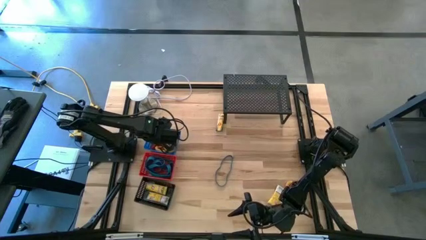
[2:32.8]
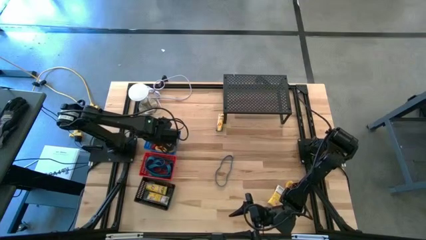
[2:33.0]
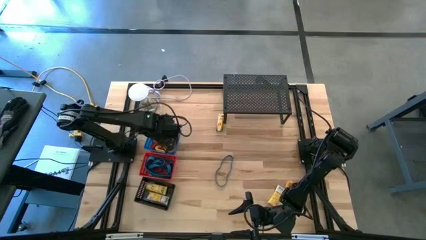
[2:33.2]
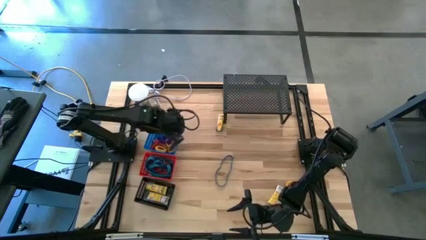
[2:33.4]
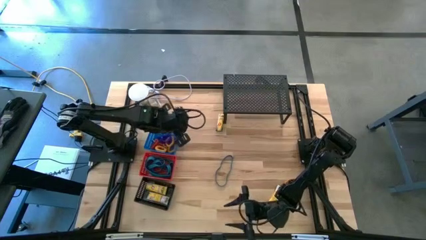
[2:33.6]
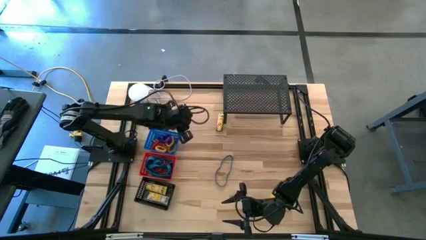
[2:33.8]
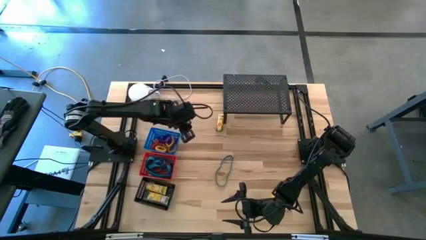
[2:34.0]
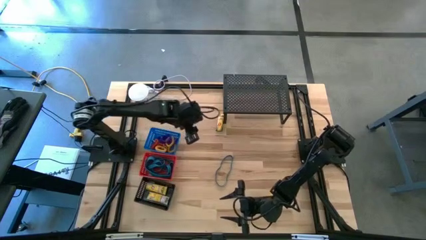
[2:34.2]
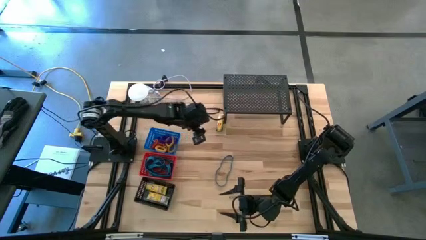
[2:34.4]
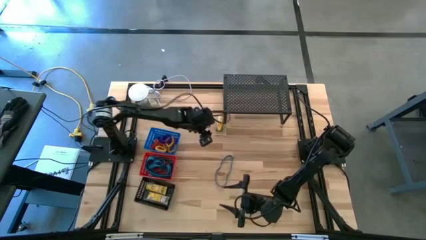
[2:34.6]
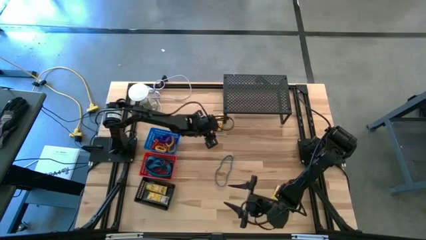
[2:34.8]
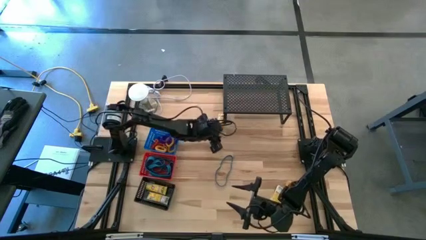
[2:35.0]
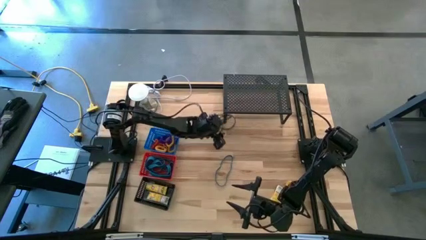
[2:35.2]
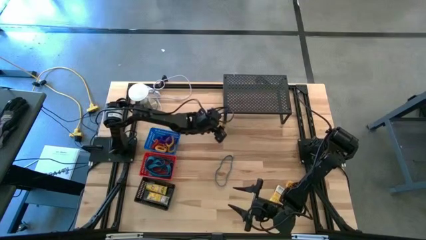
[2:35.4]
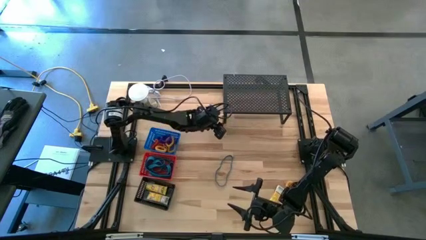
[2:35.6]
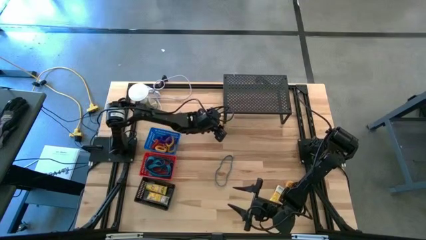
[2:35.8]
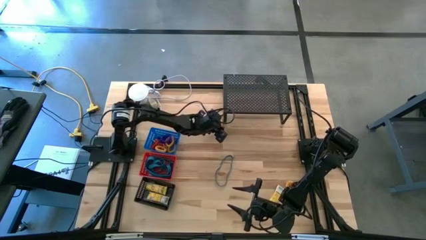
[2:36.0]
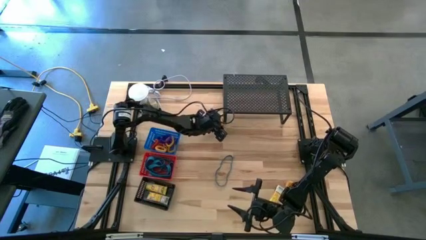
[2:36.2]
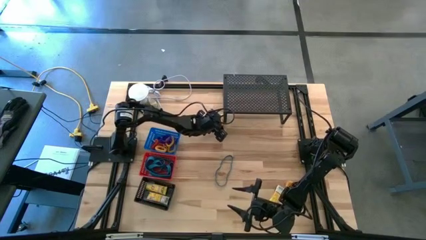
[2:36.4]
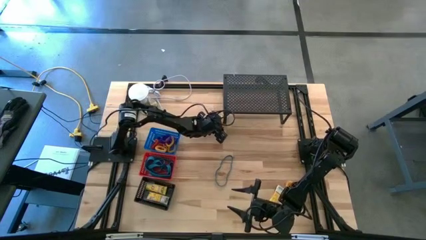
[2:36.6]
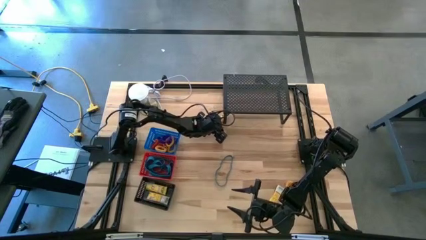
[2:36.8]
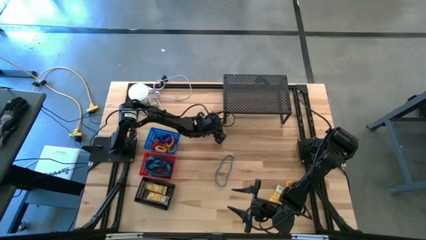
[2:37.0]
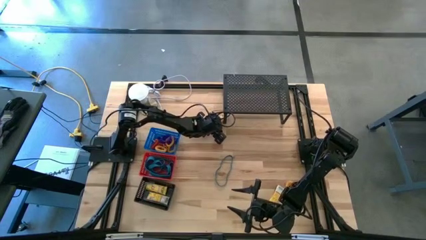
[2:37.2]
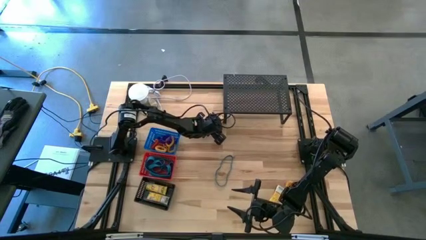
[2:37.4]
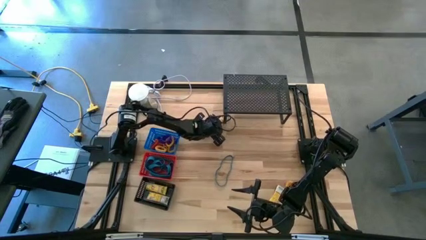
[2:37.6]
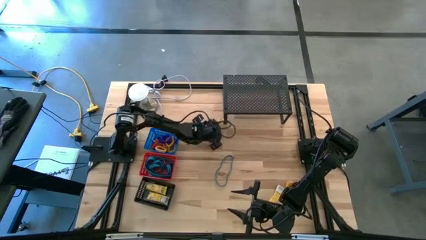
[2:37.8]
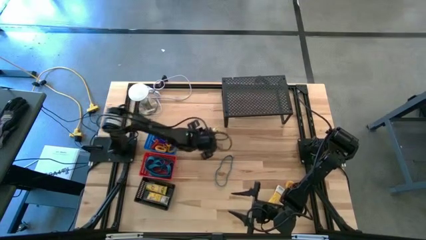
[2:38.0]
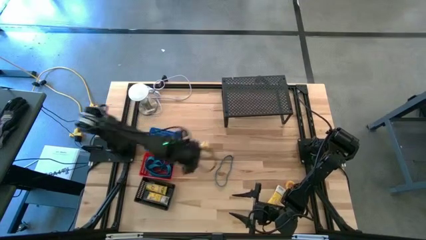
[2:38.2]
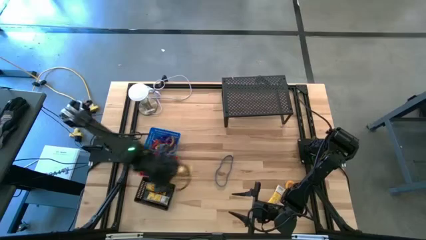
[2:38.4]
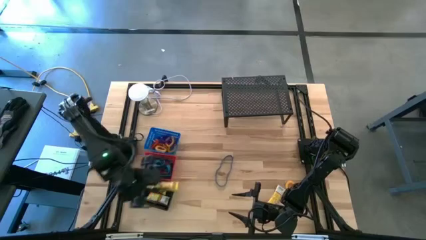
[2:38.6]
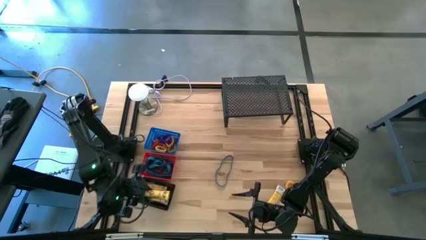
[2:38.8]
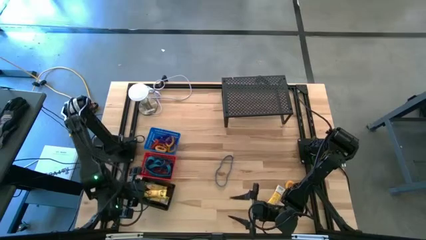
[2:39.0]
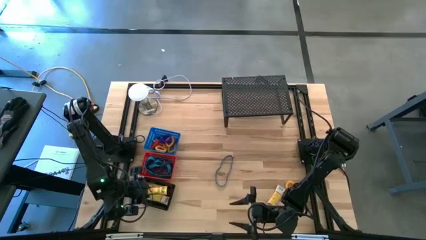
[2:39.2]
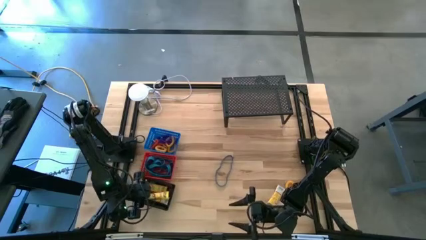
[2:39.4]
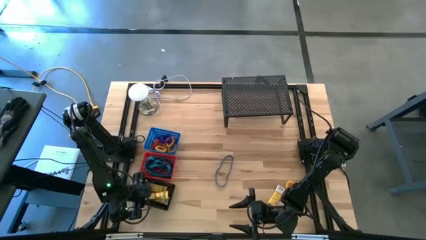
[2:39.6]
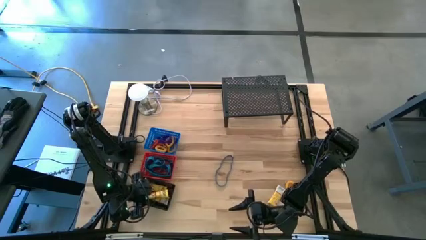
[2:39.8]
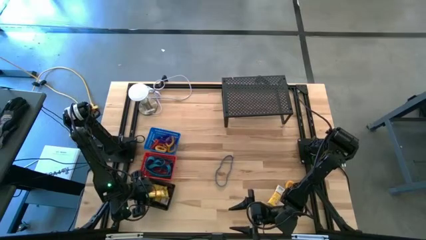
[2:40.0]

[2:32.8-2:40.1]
Task: Pick & Place Office Desk Supplies
Put the yellow crayon box into the black bin

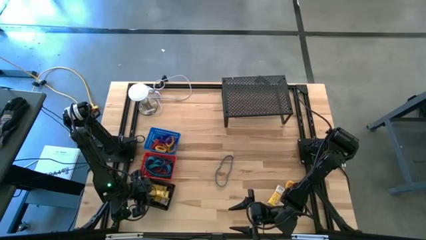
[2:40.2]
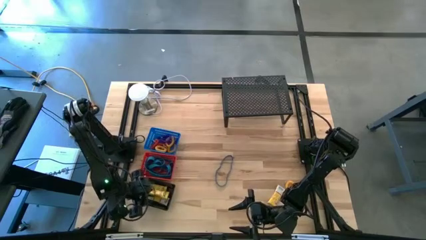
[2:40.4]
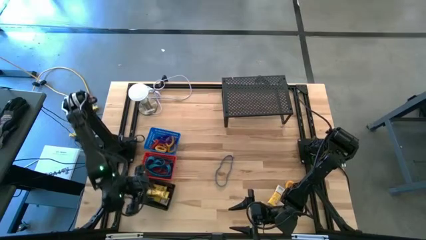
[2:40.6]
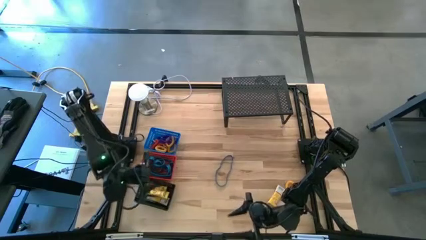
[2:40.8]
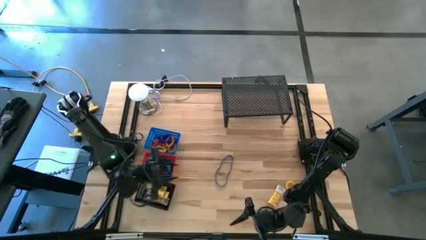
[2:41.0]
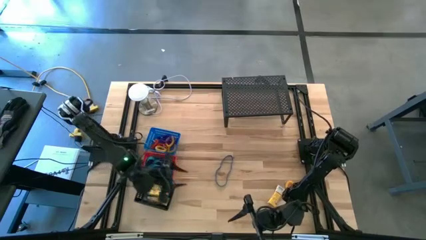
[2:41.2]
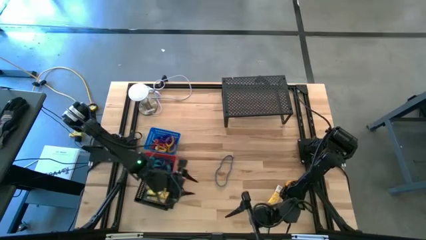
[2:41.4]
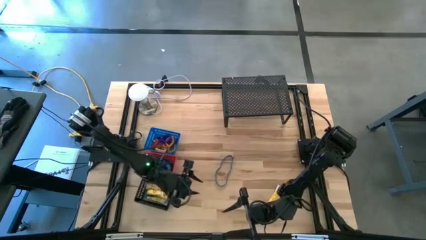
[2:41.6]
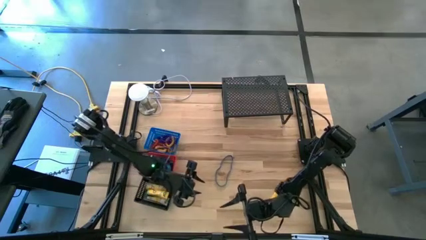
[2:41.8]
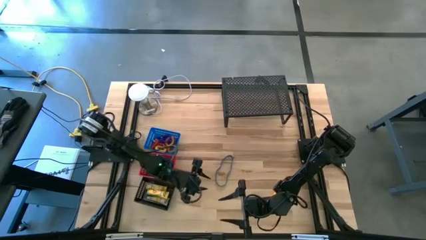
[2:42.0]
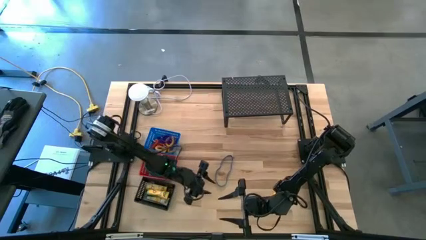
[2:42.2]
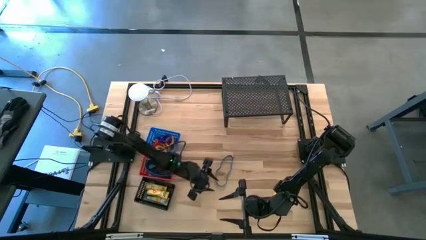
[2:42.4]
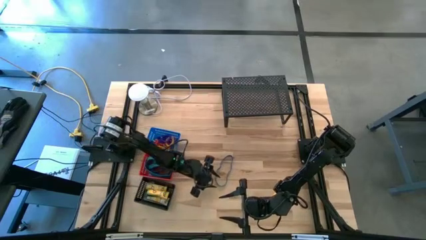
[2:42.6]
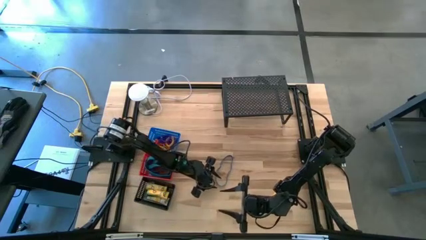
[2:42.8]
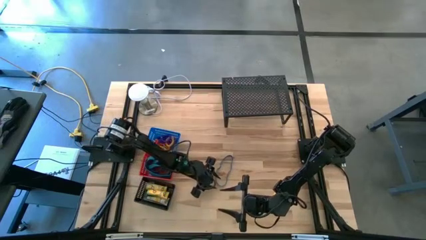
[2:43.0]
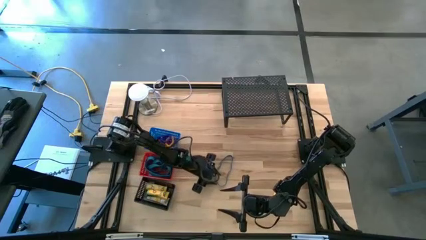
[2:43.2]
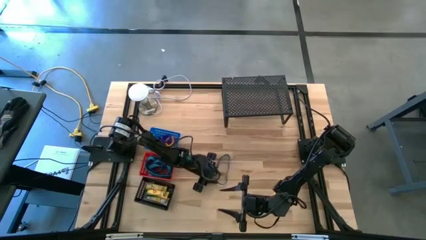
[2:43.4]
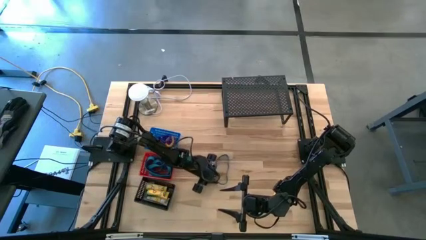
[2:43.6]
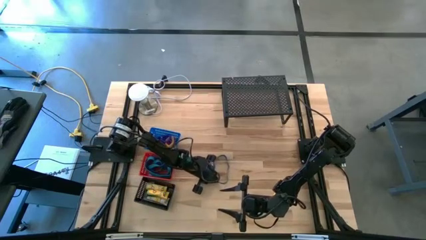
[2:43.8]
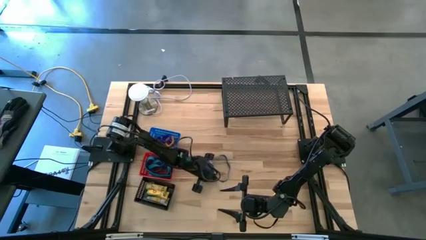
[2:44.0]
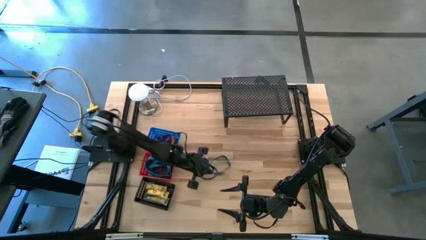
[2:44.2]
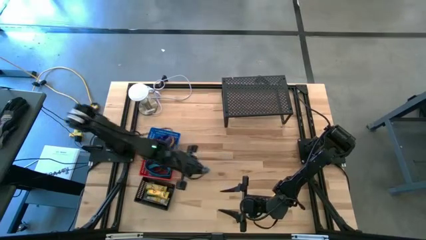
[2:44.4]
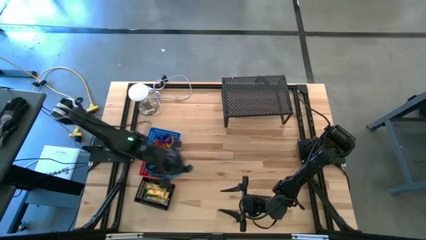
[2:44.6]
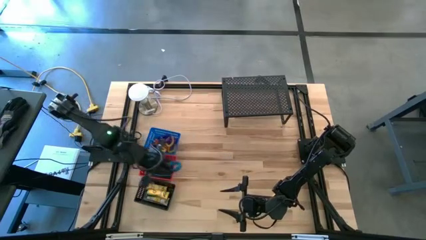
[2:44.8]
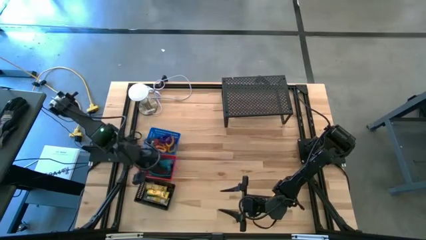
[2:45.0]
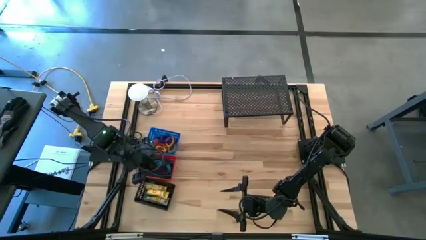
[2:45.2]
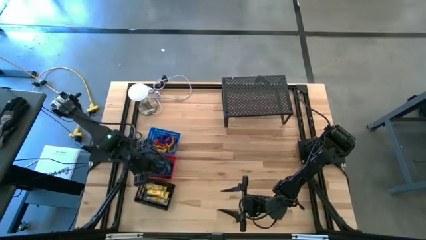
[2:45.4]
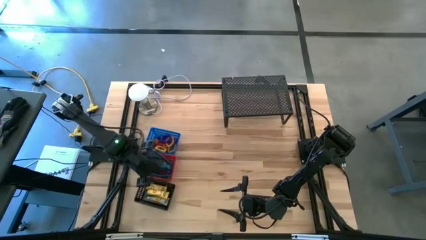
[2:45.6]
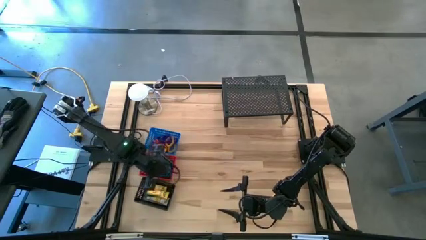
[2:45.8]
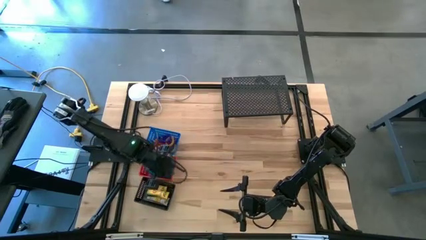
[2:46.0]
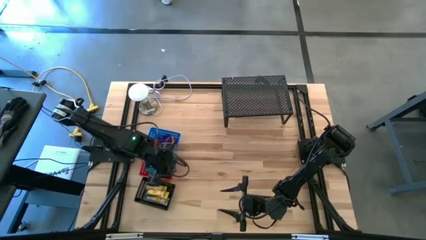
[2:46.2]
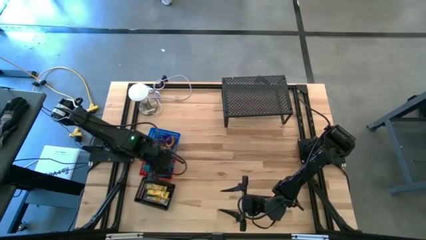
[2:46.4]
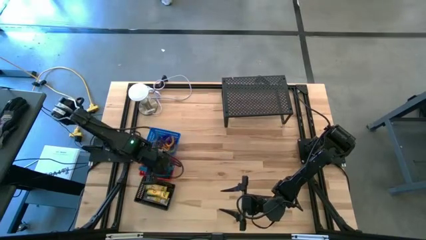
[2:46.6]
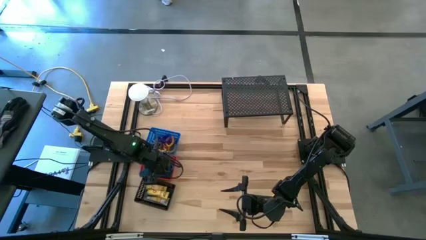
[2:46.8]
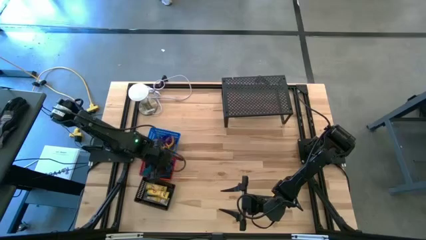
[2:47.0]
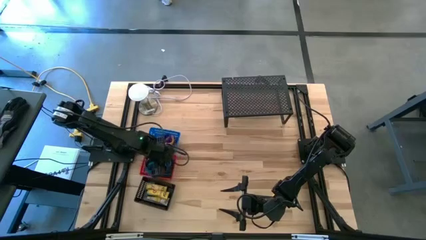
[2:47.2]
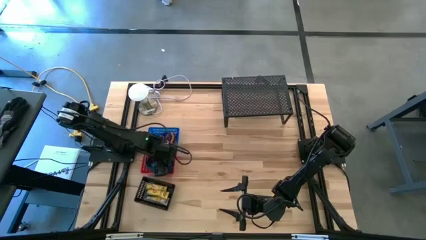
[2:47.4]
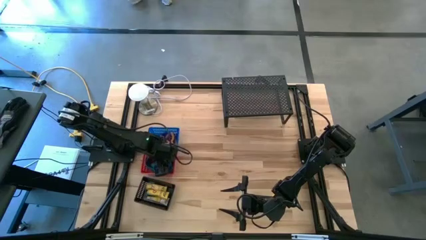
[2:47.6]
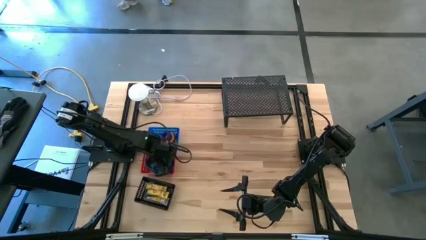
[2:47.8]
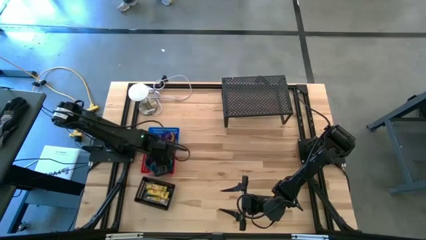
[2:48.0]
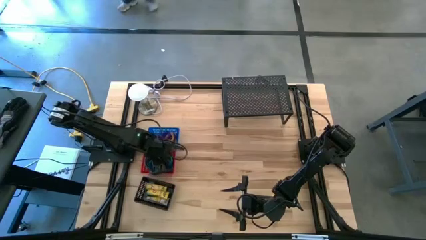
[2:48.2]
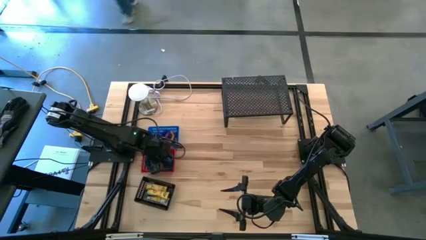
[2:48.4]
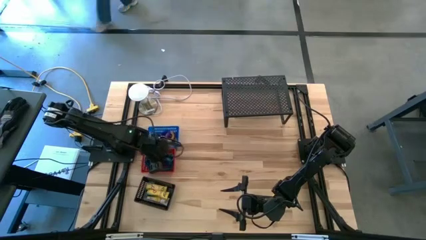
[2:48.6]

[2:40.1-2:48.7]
Put the blue rubber band into the red bin
